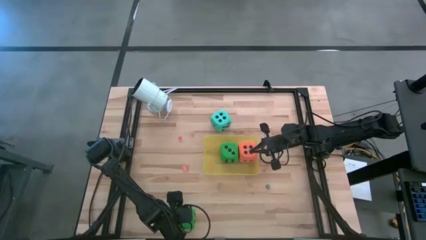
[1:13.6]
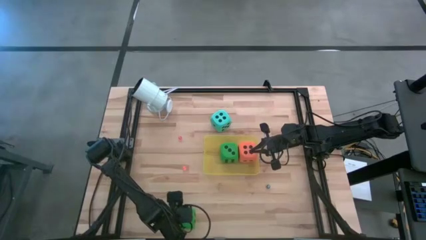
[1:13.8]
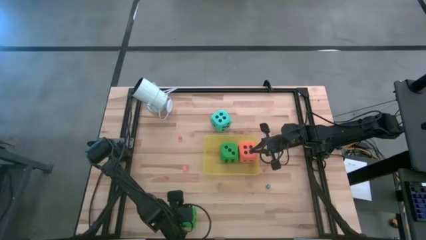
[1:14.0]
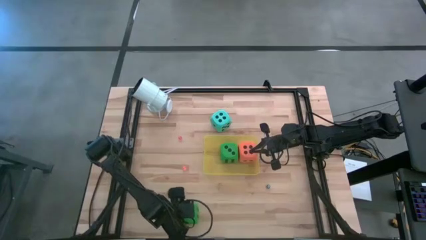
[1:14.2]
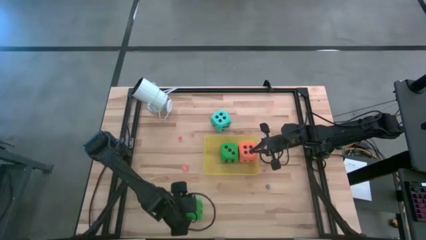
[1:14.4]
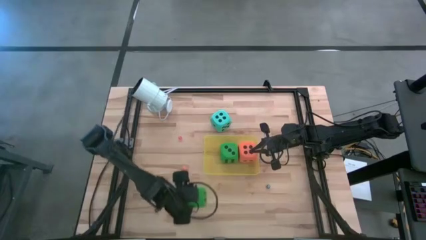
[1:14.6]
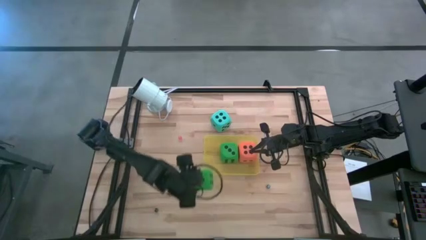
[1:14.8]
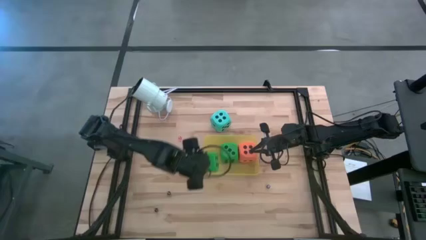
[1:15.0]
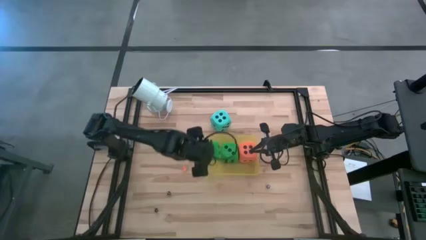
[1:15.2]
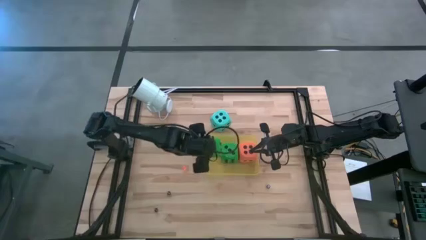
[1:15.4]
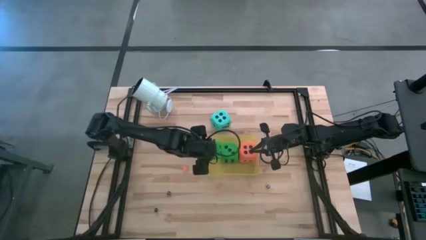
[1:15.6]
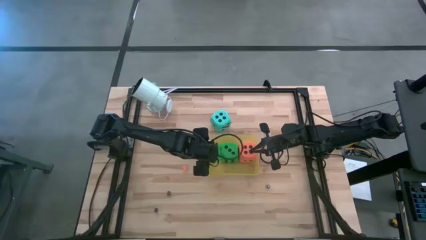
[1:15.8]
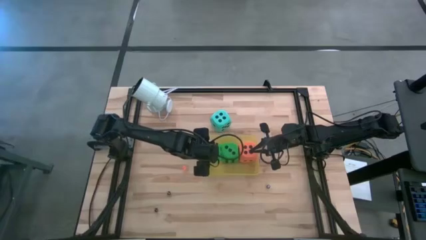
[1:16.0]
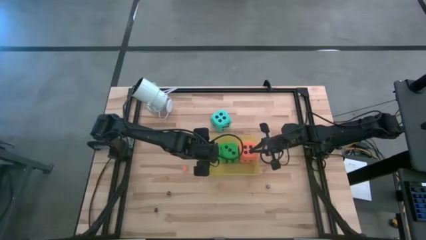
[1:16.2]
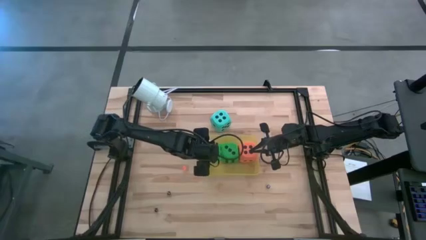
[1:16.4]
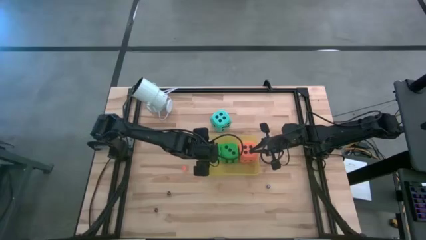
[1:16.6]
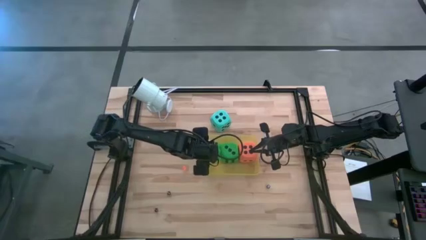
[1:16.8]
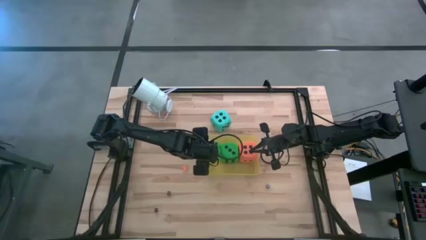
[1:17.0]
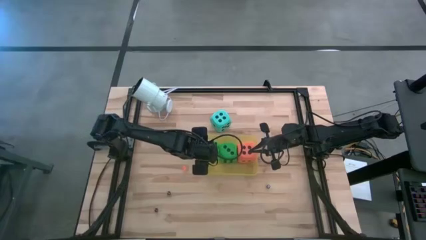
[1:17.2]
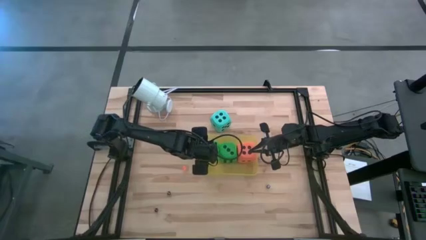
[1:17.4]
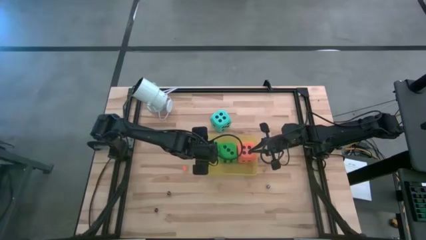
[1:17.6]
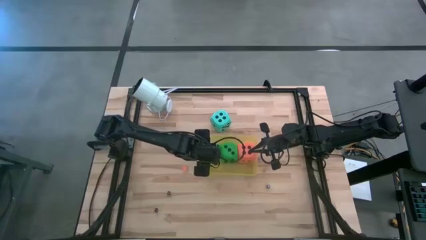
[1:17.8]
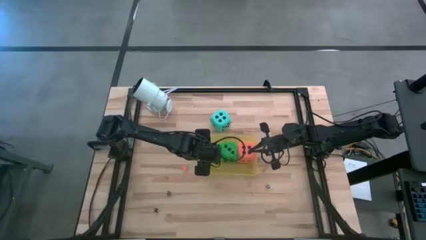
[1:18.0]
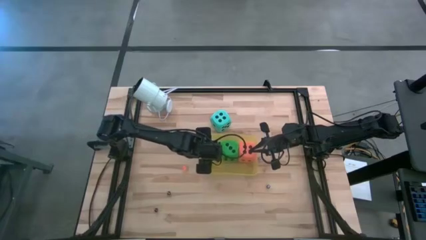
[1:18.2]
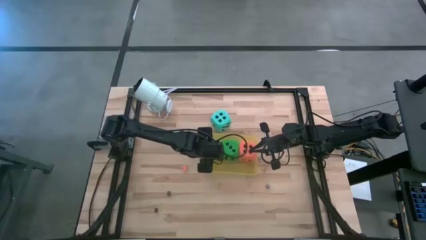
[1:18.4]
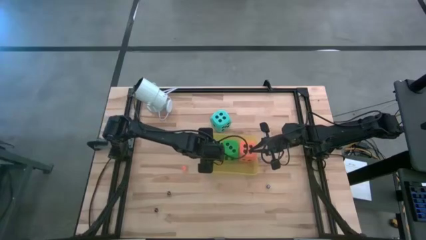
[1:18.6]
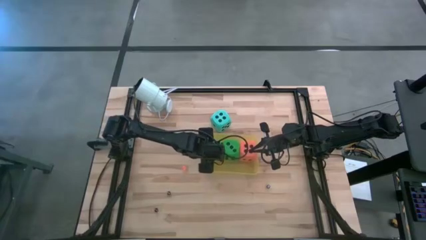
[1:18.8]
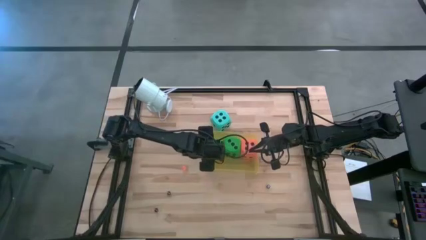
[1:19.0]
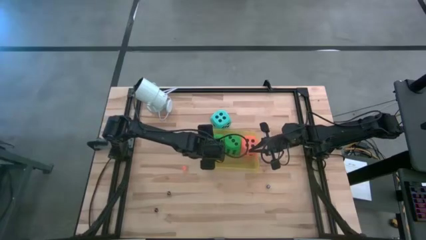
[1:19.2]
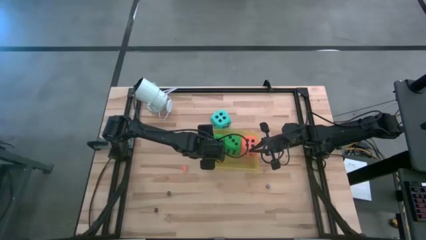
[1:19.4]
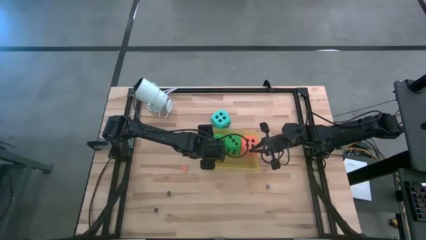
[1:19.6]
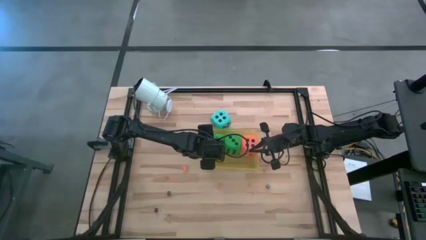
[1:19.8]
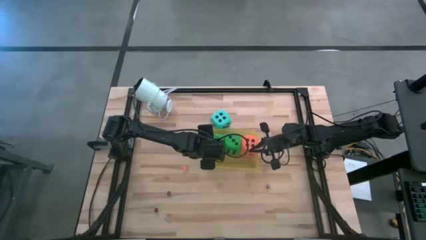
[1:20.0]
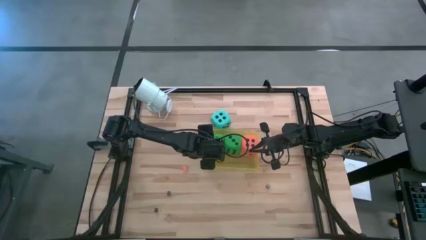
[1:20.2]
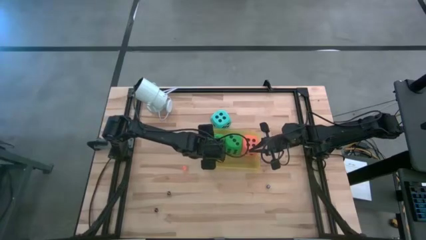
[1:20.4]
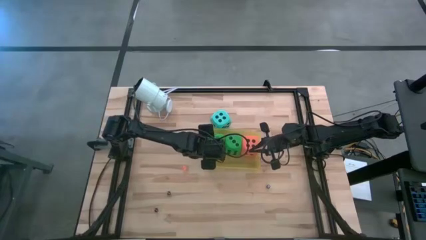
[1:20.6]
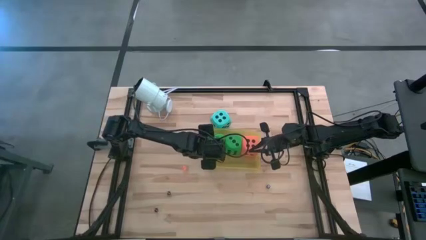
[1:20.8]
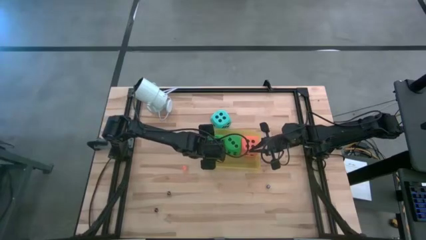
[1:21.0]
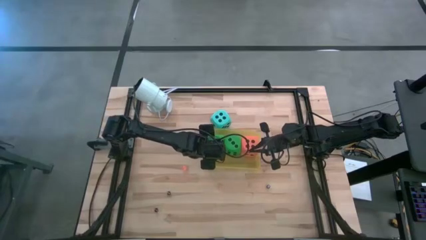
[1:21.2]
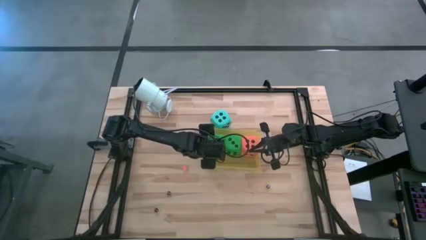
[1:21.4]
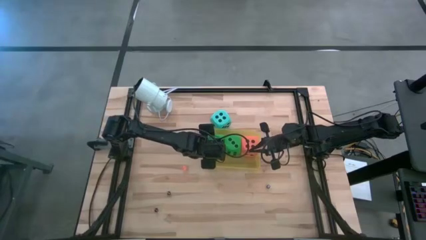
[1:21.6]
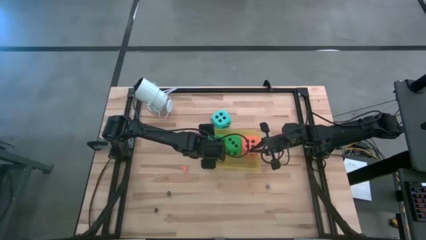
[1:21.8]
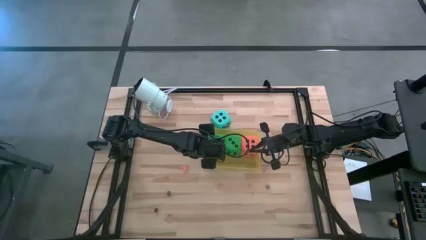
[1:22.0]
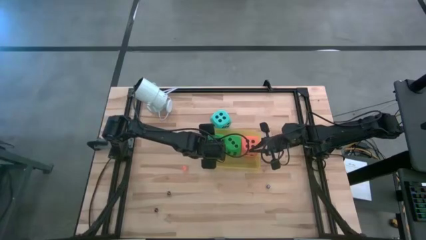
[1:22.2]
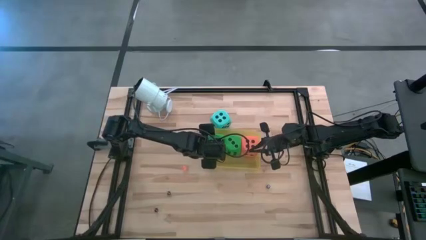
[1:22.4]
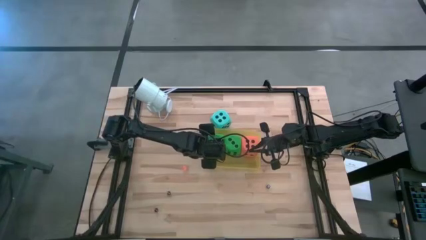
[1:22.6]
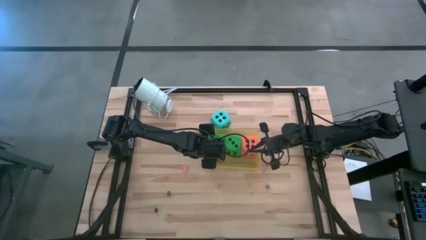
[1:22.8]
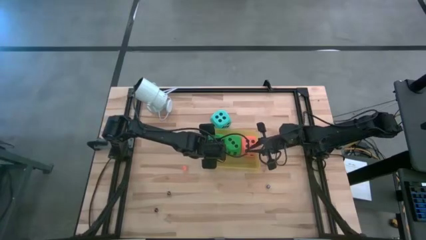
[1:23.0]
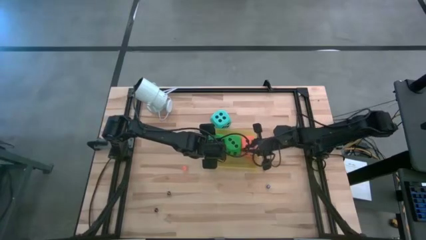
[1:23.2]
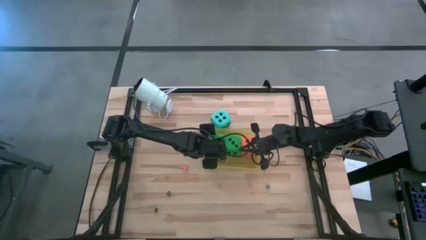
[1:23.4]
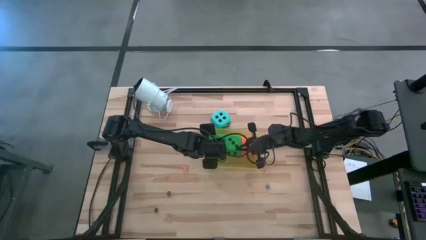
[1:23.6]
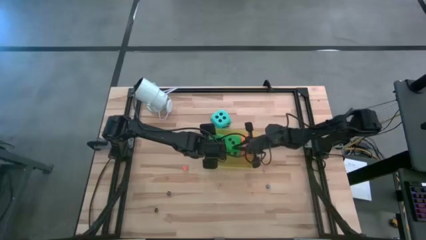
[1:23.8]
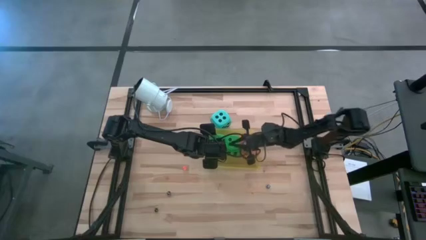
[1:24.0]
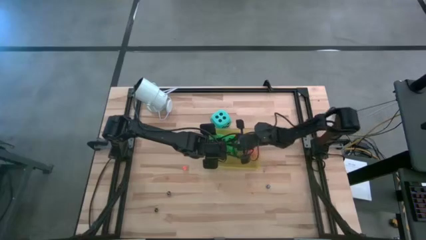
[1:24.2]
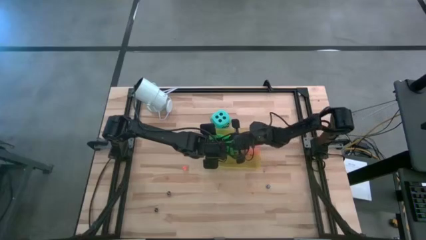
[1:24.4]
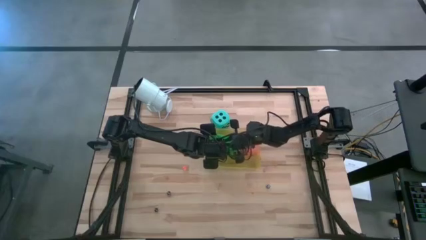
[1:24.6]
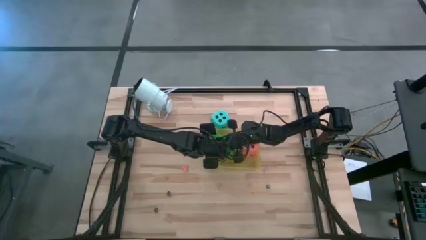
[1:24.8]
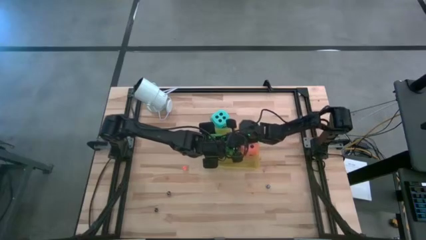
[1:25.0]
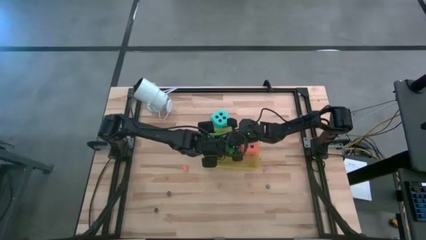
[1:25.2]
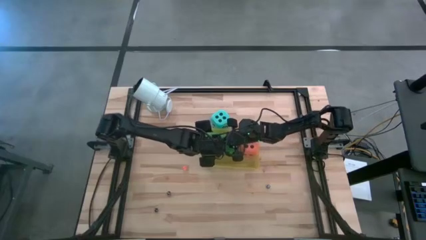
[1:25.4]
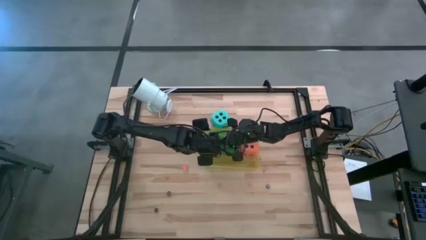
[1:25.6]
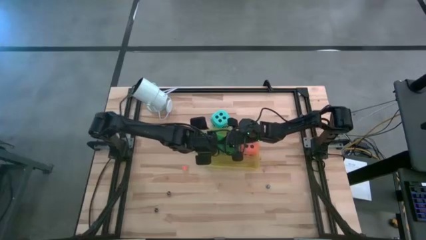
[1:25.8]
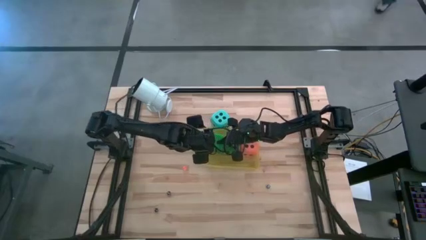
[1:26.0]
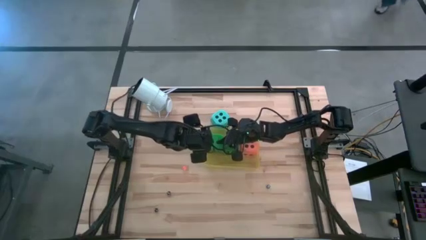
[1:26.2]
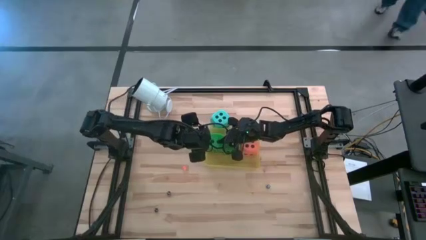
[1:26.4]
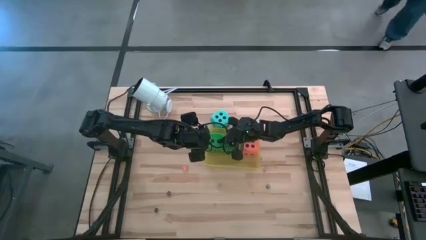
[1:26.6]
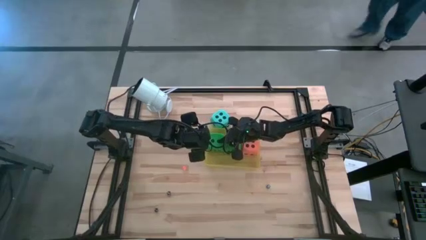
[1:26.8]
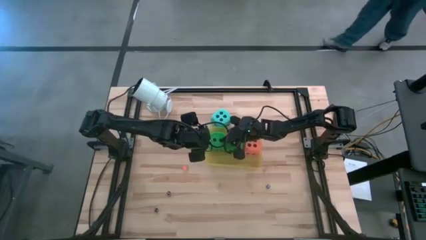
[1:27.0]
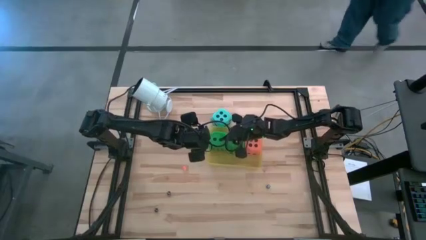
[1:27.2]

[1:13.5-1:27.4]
Task: Pick & Place Dice
Put the big green dice into the yellow bin

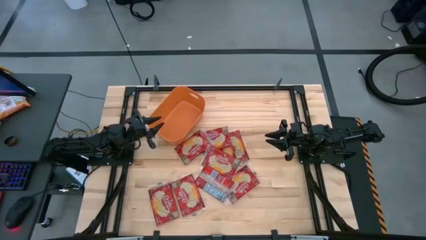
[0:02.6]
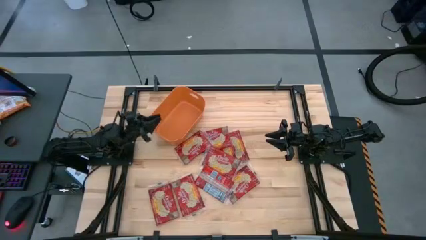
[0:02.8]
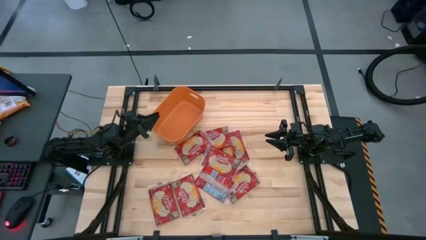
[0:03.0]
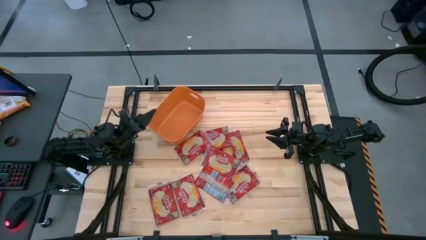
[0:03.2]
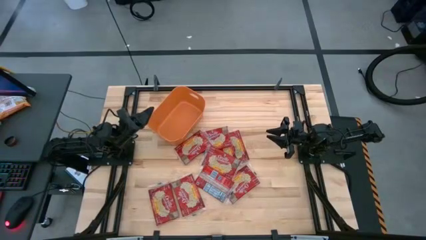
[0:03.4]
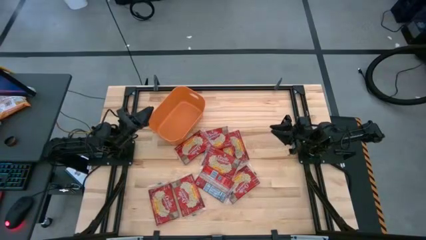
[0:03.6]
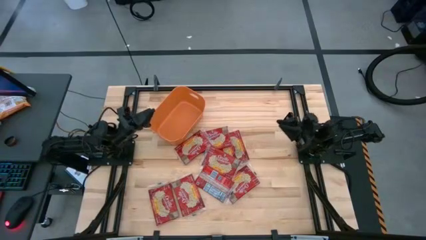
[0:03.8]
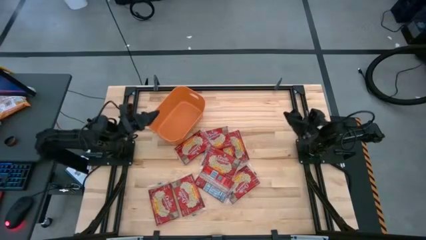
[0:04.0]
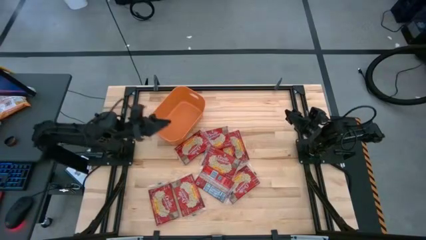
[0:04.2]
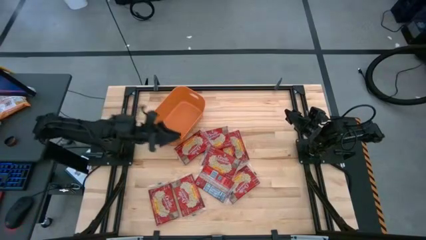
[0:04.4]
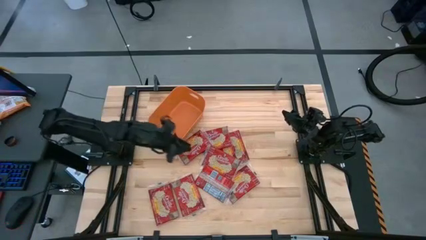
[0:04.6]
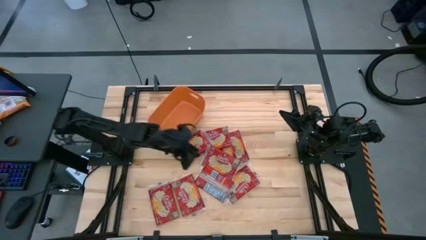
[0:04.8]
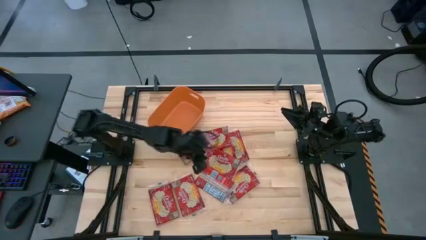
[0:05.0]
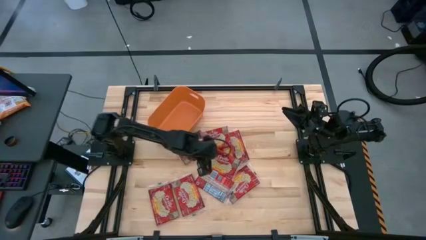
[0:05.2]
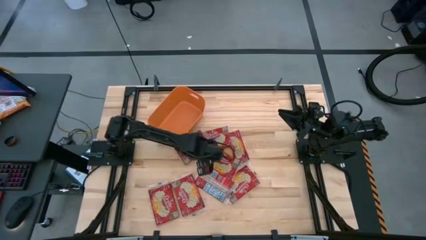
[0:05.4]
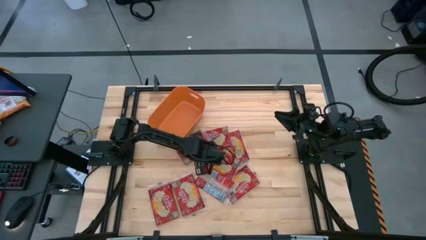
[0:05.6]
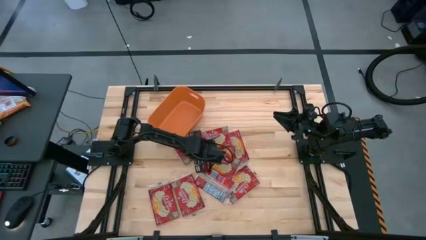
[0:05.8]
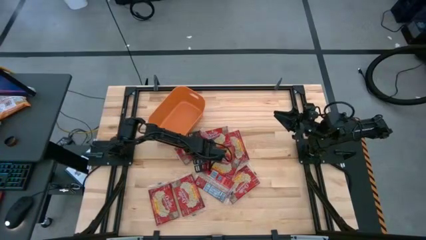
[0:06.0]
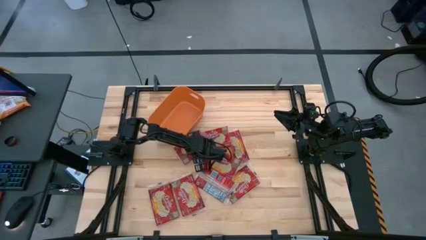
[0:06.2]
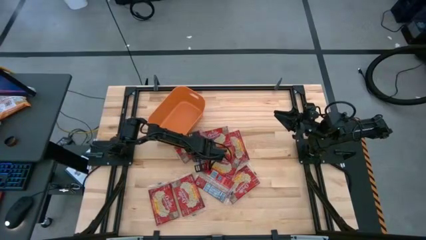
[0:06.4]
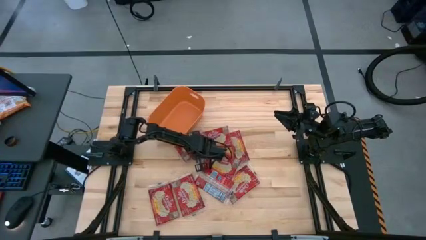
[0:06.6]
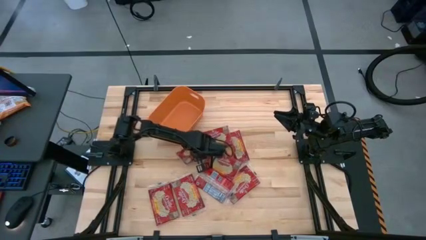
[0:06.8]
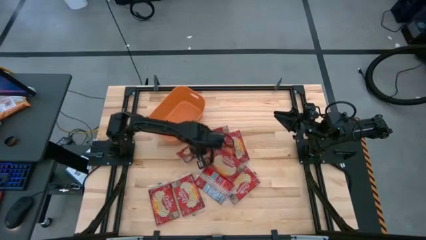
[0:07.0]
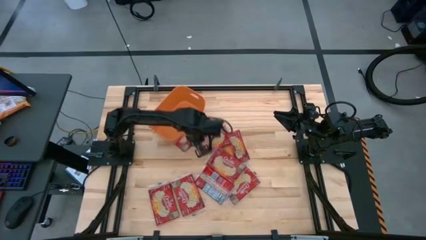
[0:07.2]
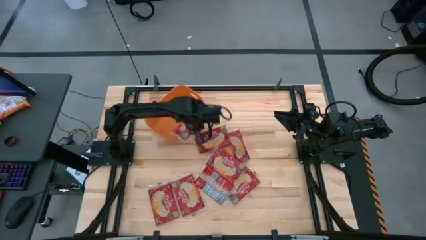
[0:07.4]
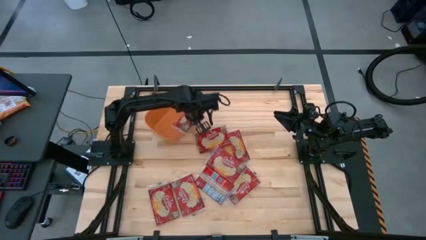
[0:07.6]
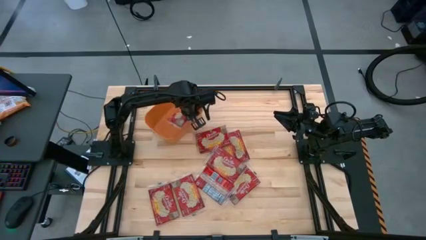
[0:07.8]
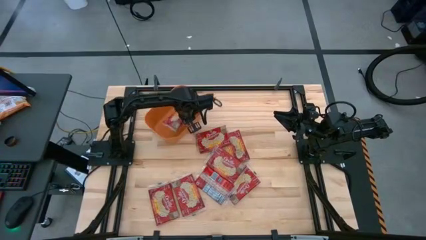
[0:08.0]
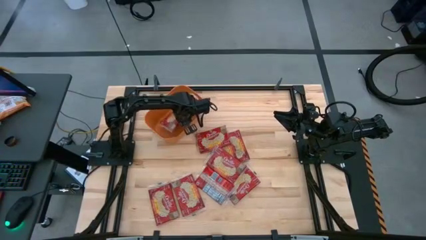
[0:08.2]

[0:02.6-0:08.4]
Task: Sort popcorn bags into baskets
Put the red popcorn bag into the orange bin
